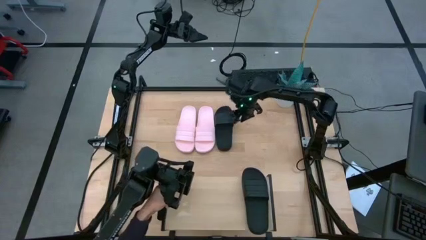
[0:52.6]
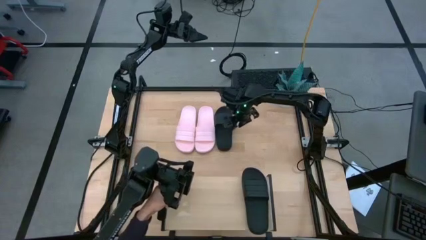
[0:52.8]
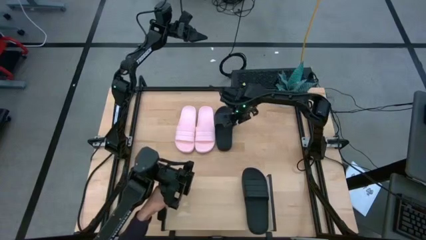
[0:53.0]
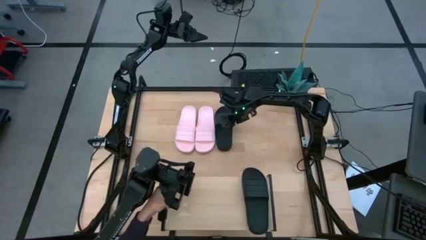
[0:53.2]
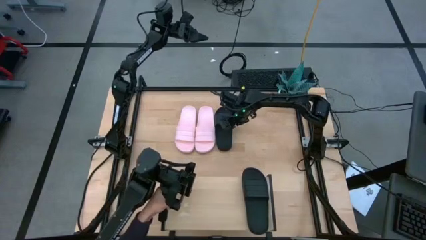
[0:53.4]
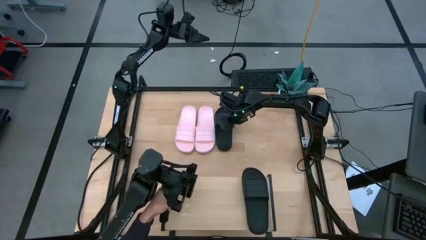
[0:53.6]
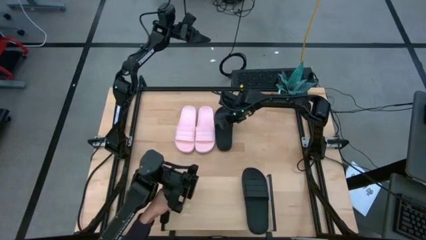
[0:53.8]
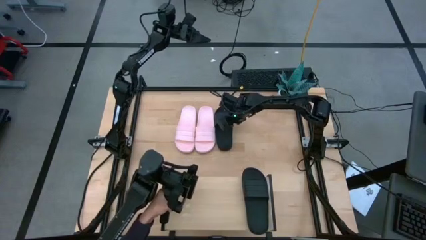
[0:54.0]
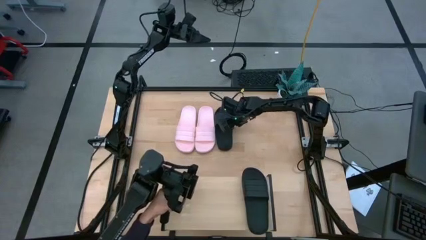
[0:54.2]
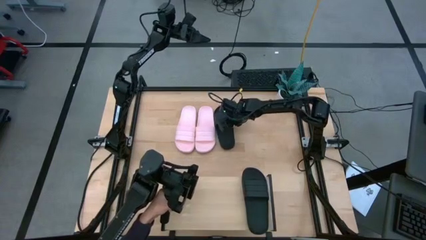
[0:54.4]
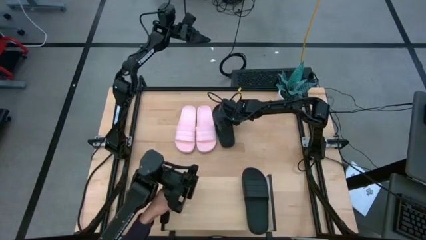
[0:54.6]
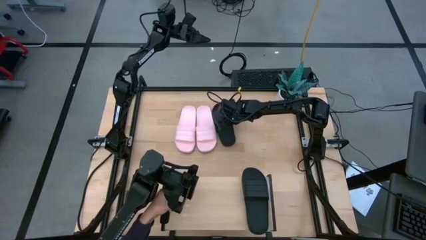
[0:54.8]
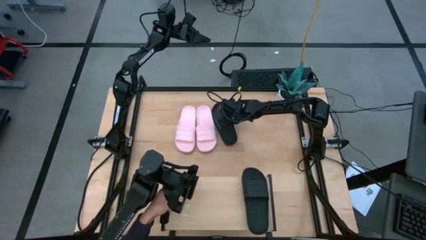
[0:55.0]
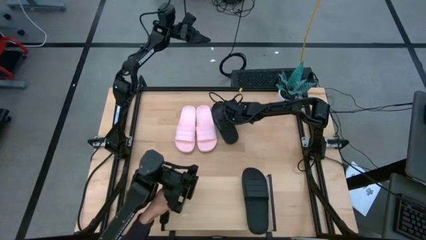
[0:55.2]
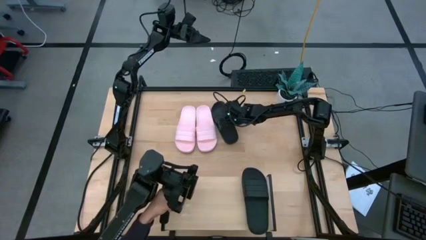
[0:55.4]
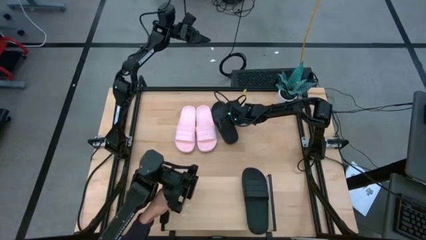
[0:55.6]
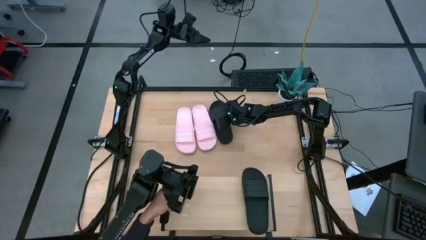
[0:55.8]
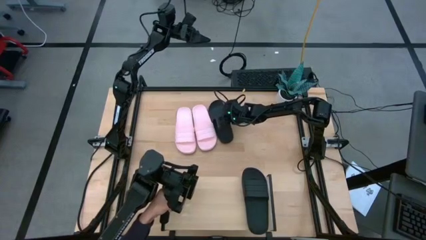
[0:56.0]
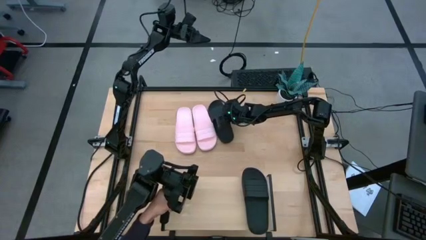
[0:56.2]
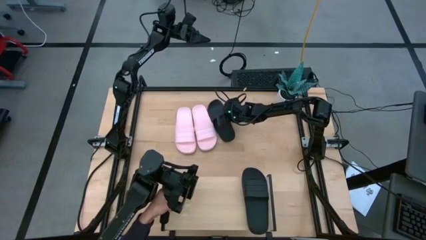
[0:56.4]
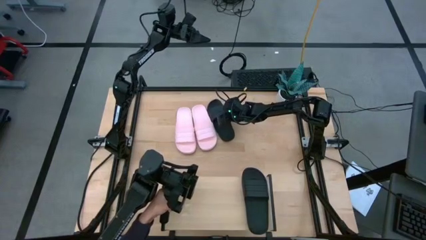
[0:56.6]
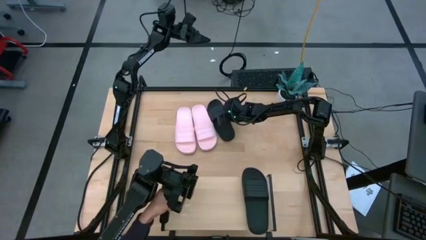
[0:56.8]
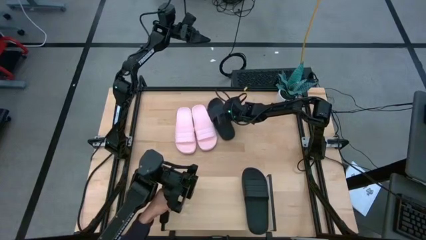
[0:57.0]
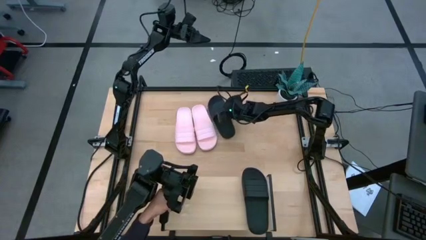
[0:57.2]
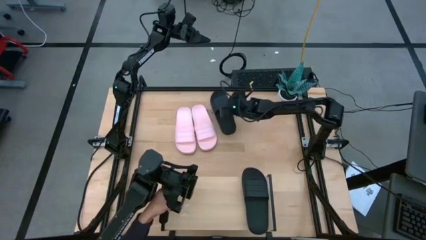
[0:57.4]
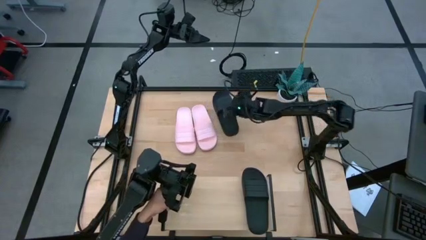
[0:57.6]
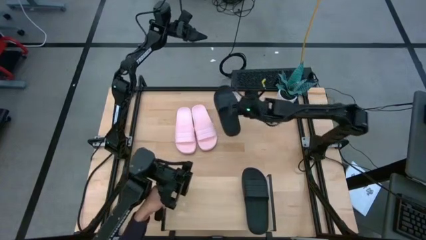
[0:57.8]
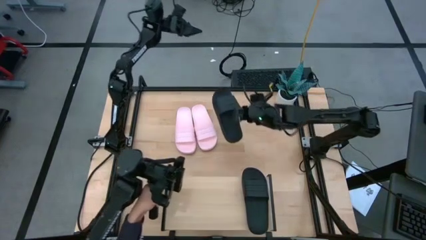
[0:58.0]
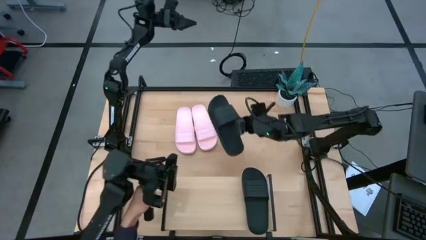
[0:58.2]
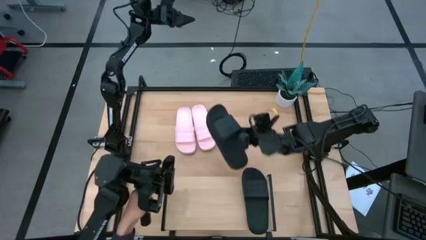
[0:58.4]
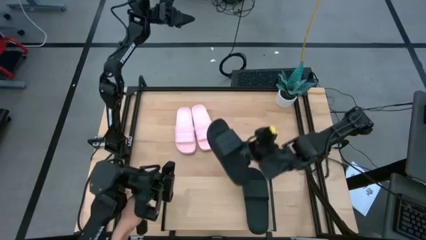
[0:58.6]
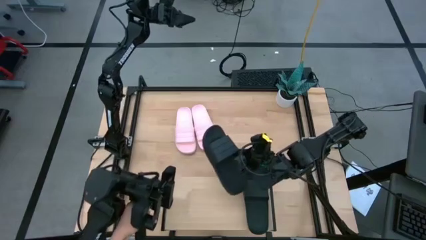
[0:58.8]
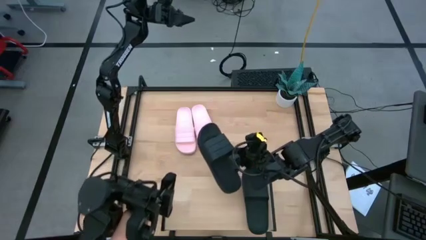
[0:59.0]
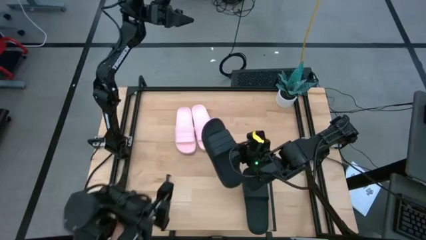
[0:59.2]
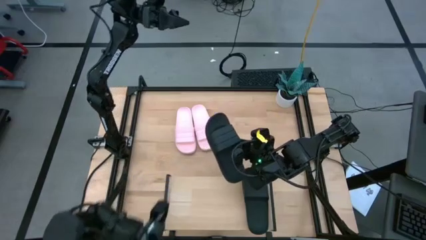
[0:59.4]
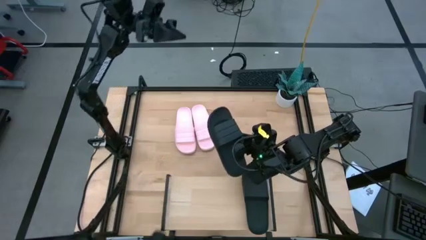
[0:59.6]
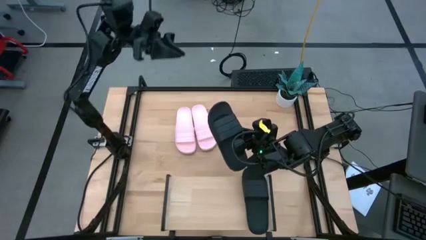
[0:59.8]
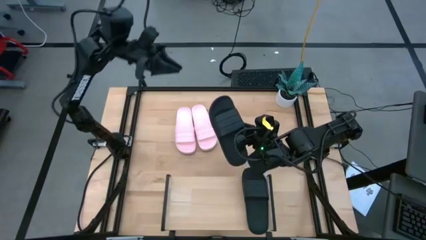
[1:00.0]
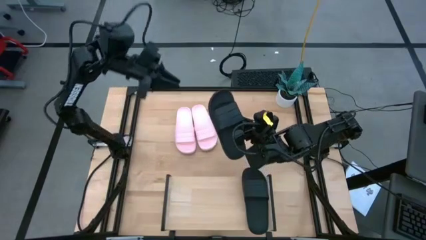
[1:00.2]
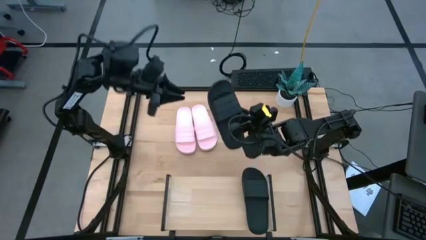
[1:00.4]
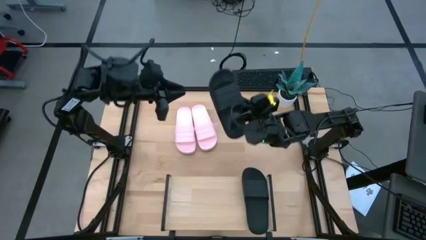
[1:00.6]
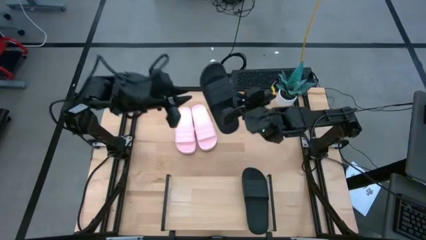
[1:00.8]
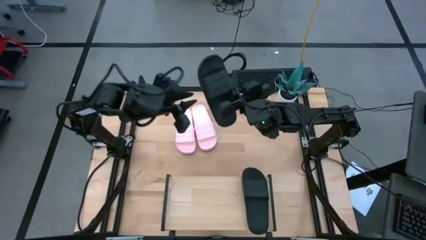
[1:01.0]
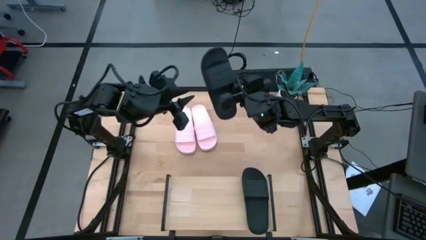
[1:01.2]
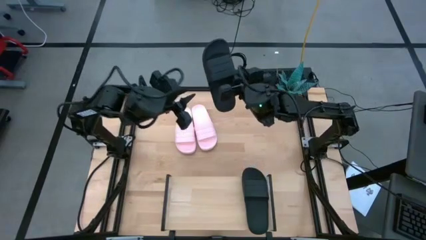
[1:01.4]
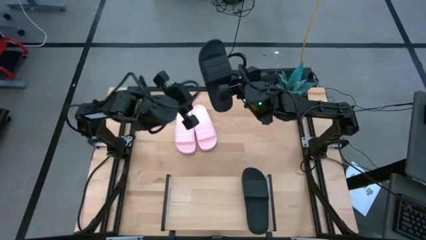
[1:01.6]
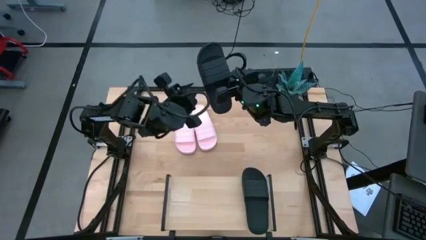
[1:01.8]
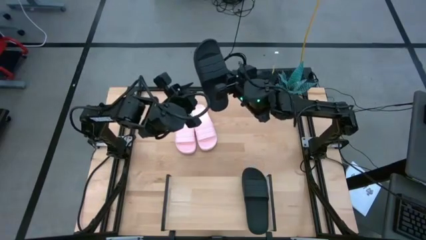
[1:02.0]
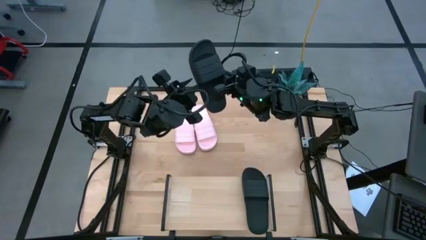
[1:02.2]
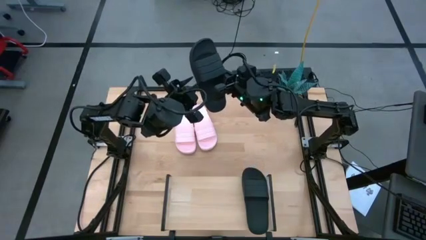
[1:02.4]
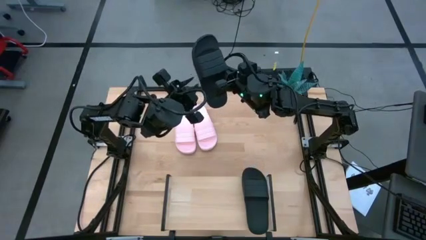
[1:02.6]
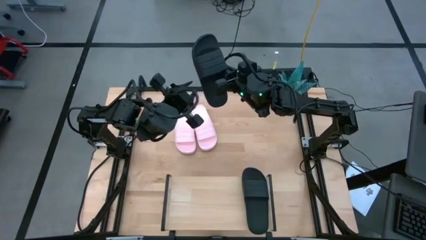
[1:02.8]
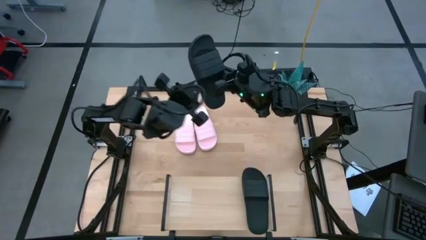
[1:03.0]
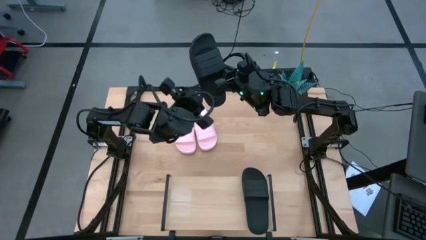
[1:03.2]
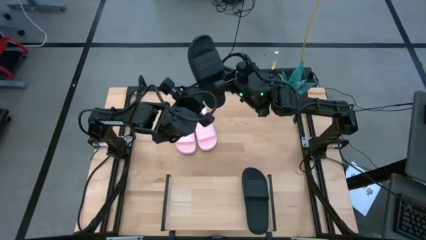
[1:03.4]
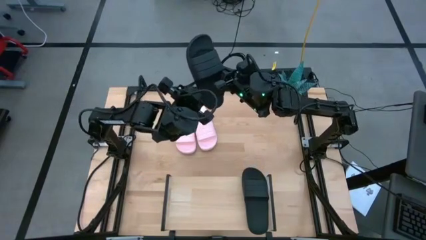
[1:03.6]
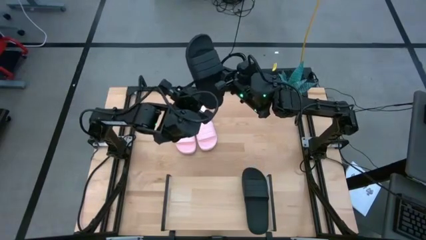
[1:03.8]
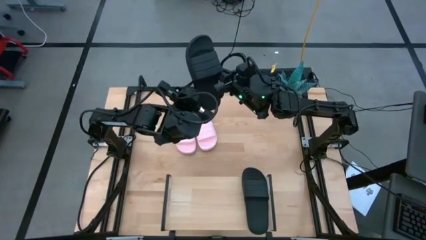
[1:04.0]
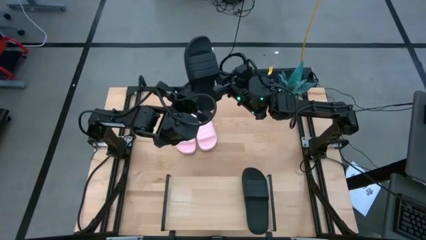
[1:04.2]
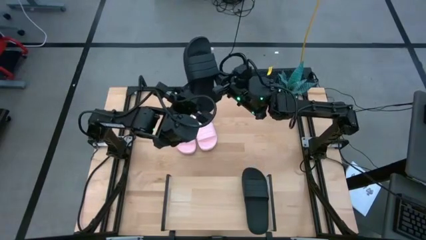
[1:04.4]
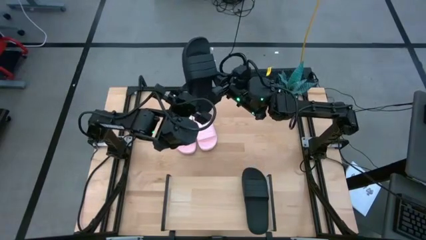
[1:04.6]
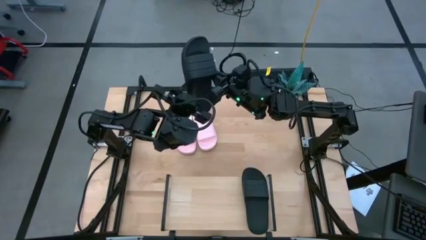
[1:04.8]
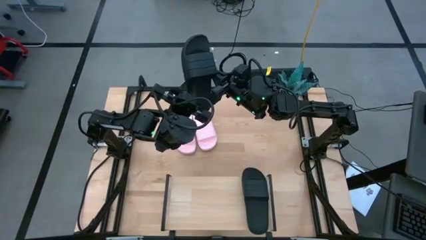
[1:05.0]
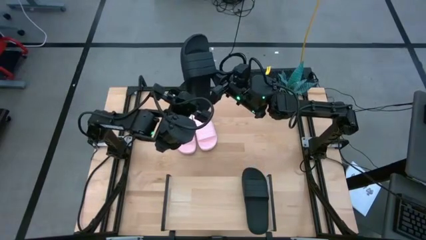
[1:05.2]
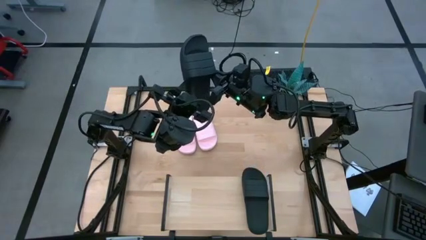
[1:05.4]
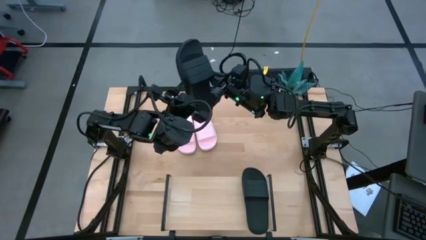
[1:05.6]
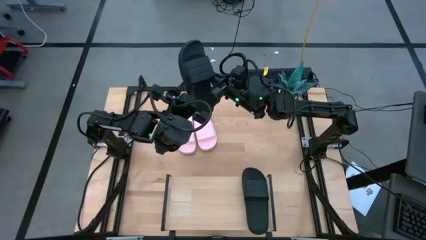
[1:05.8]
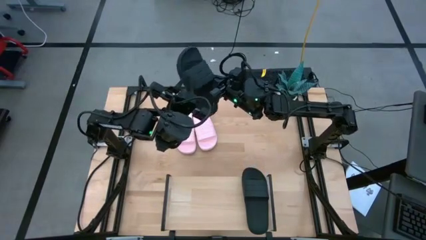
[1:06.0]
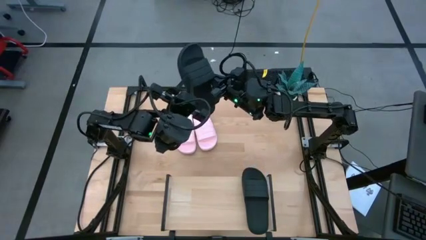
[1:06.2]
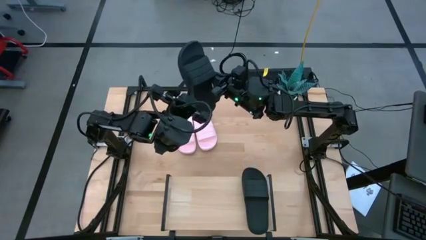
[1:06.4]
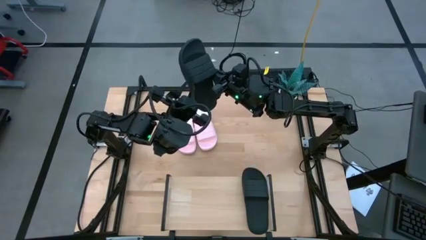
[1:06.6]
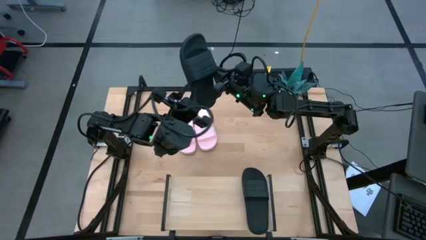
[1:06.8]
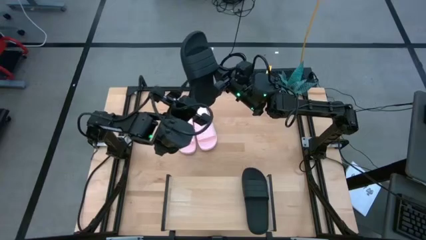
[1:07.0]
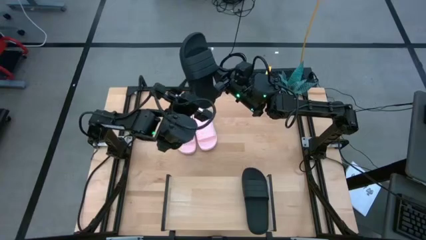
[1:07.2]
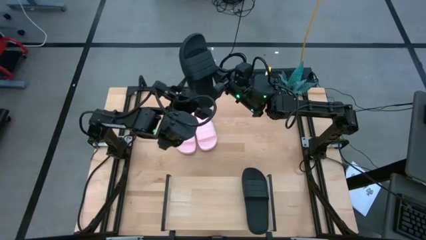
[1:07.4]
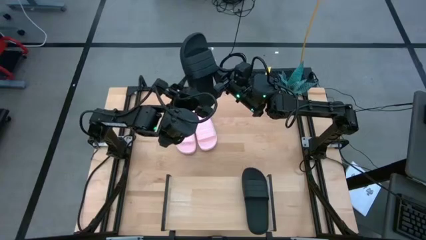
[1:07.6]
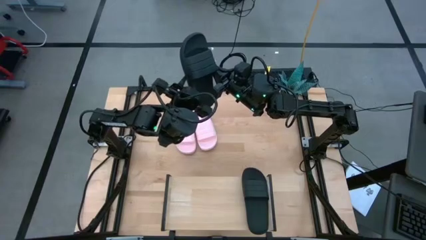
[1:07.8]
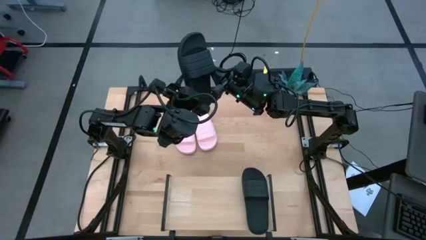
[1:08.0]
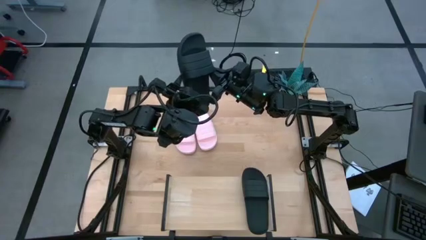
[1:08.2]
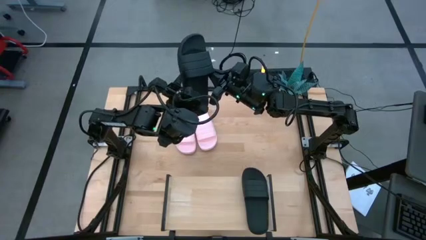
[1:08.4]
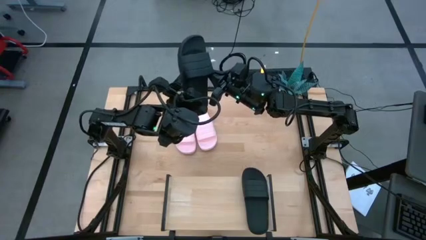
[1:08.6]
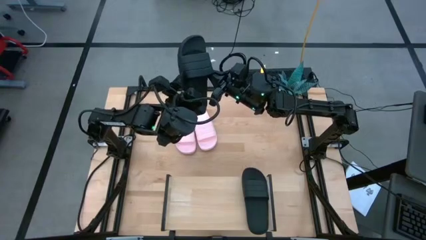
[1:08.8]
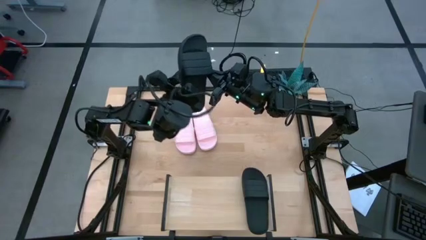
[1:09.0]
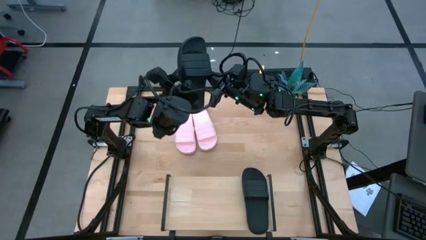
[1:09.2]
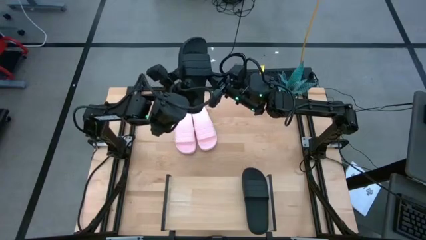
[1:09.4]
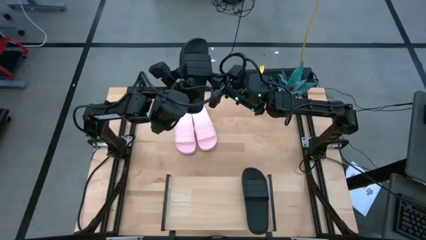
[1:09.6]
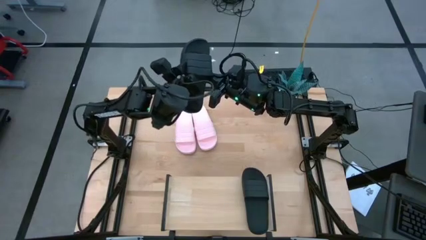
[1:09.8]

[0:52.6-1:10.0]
Task: Pick and place slides into the shelf
Put the black slipper on the shelf
